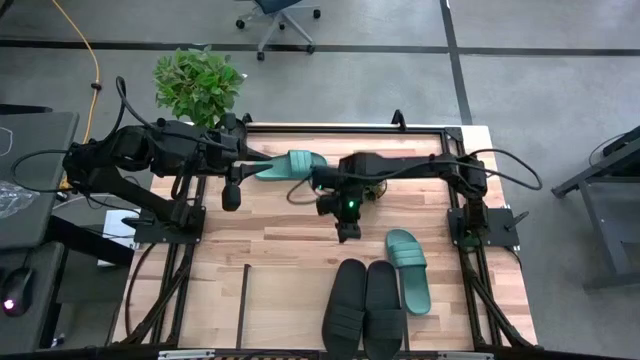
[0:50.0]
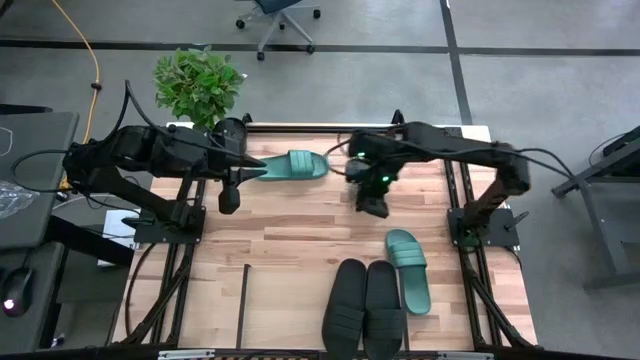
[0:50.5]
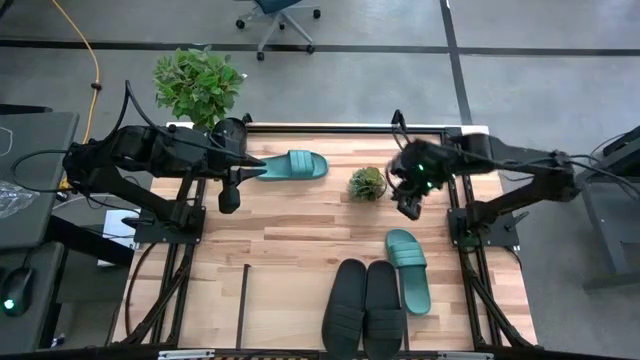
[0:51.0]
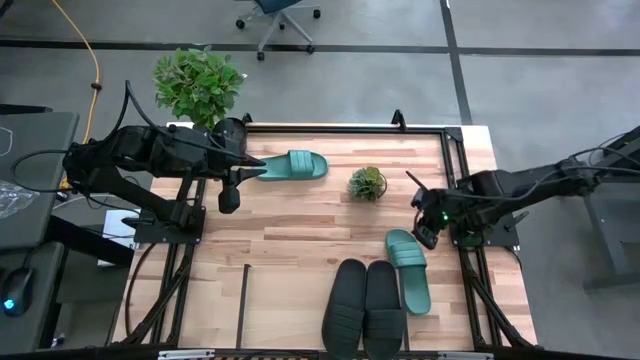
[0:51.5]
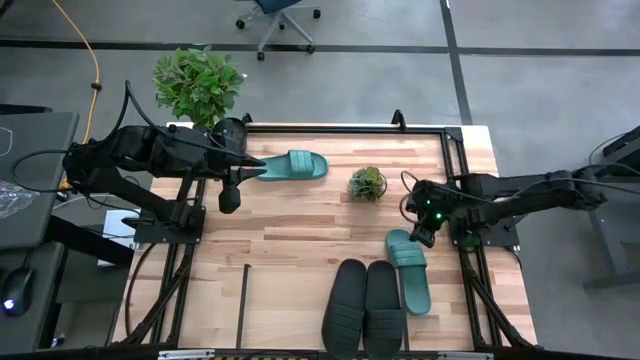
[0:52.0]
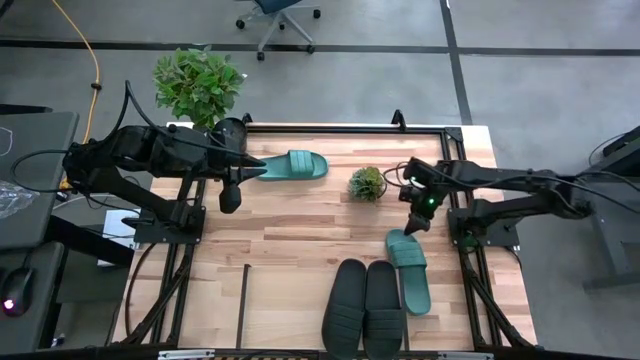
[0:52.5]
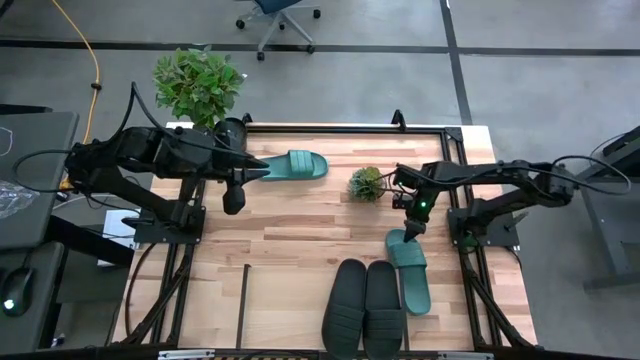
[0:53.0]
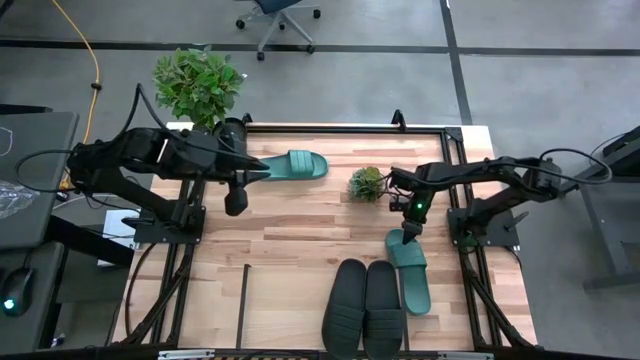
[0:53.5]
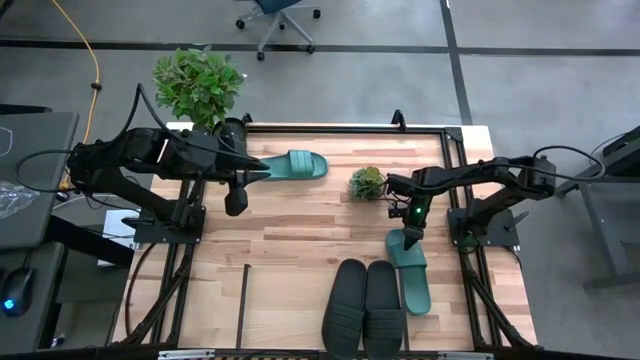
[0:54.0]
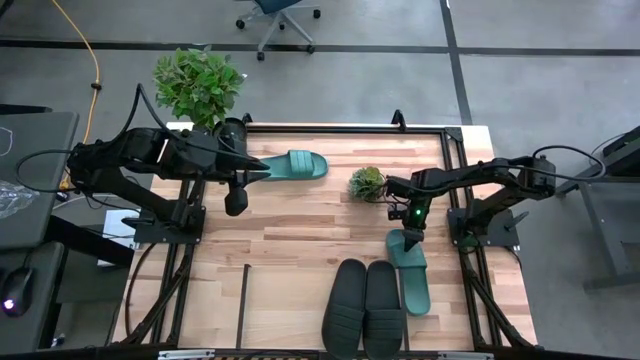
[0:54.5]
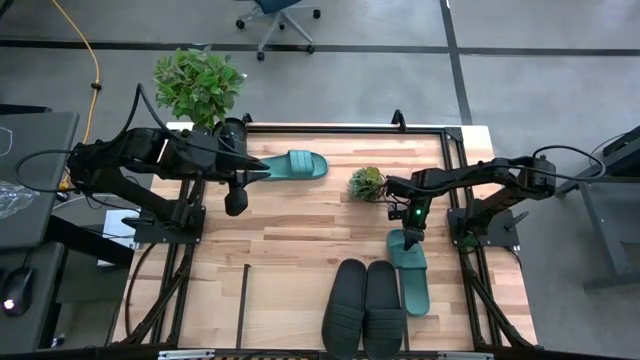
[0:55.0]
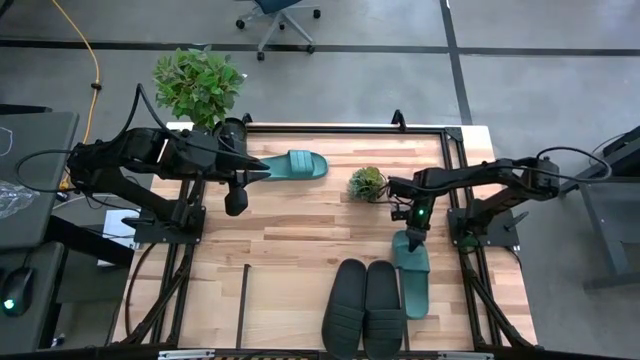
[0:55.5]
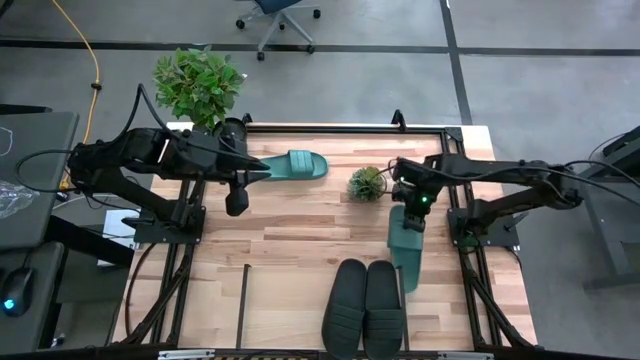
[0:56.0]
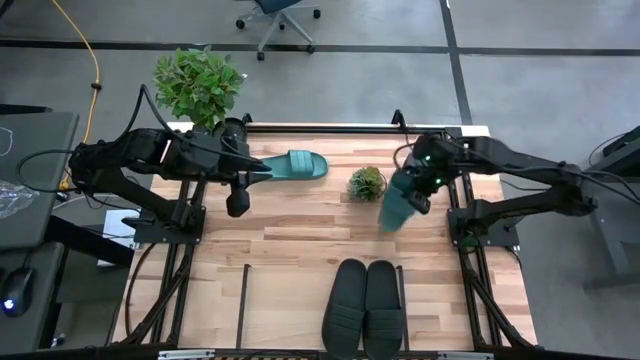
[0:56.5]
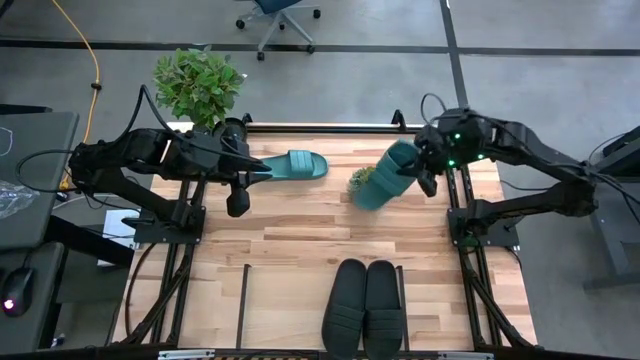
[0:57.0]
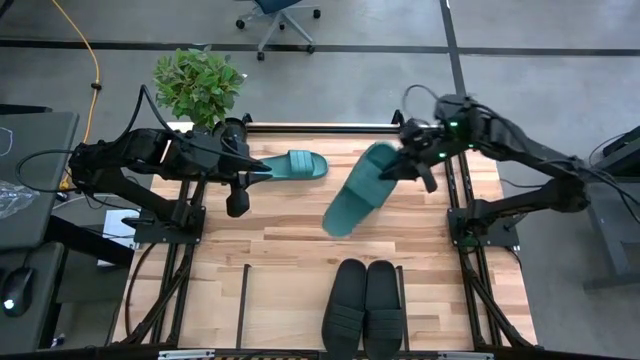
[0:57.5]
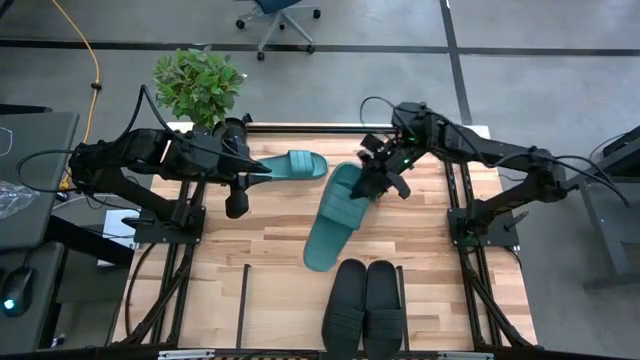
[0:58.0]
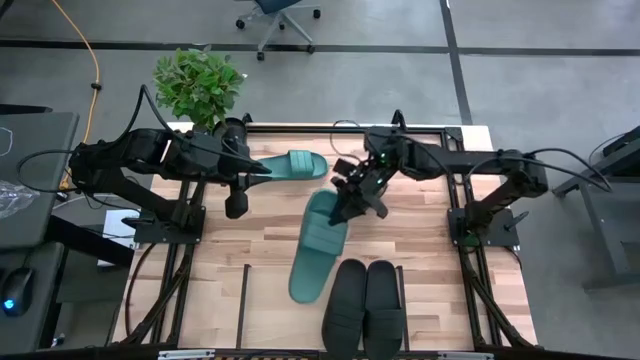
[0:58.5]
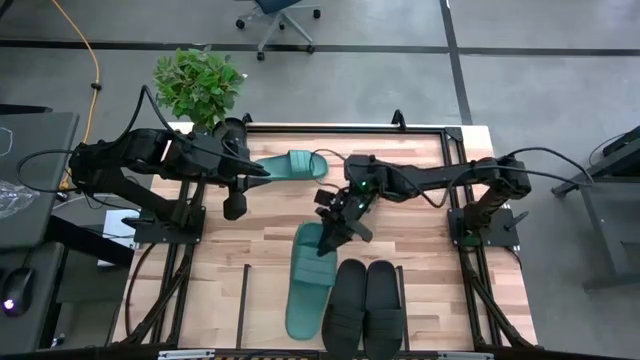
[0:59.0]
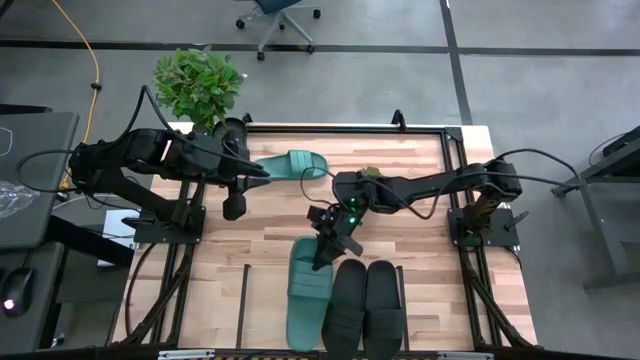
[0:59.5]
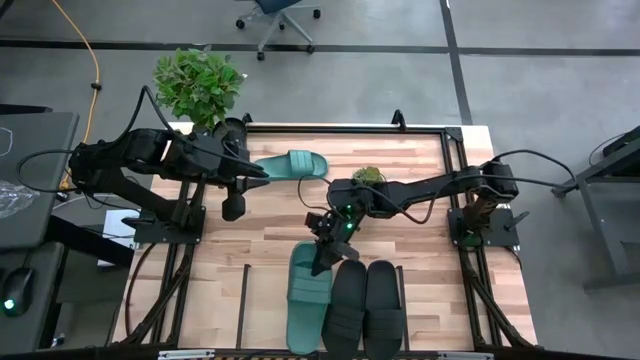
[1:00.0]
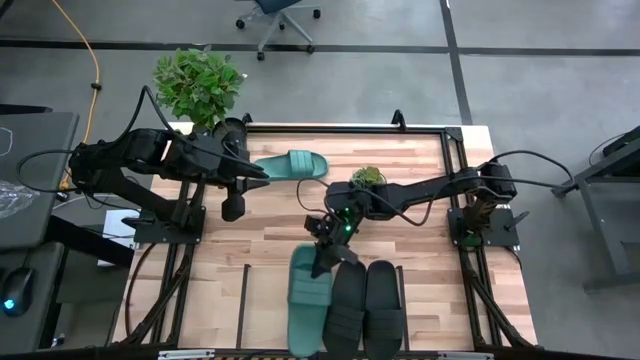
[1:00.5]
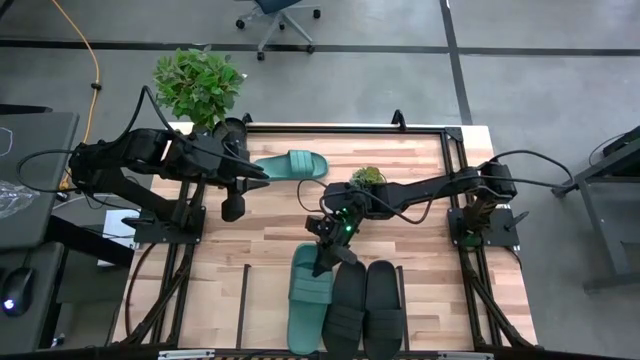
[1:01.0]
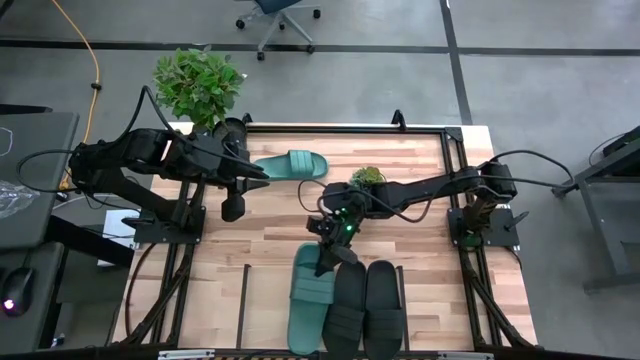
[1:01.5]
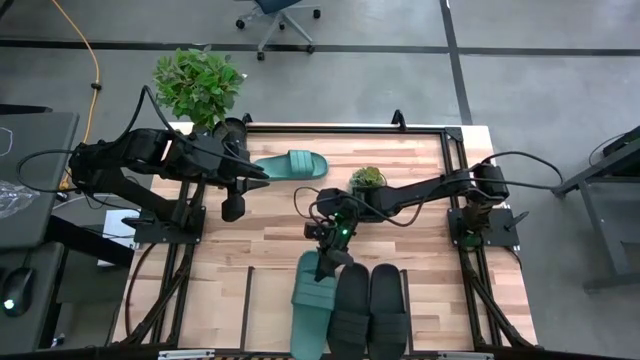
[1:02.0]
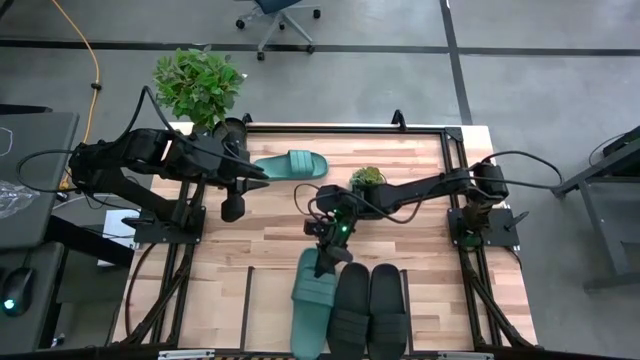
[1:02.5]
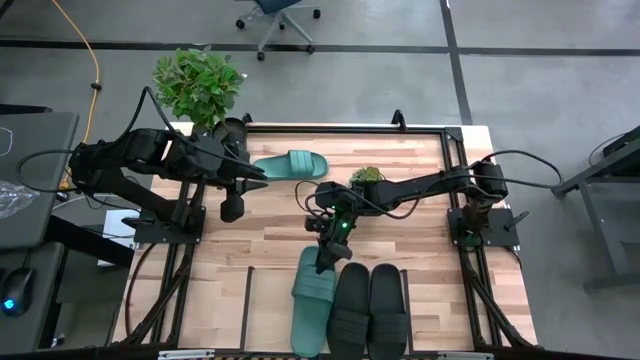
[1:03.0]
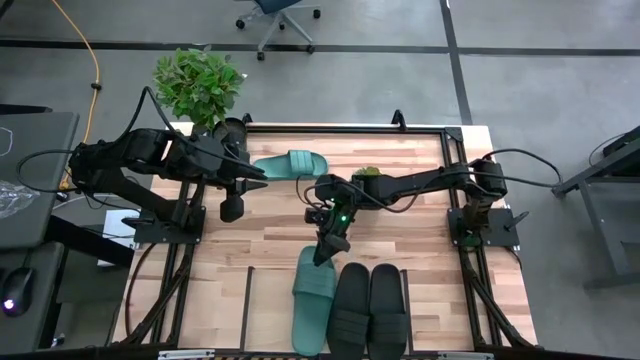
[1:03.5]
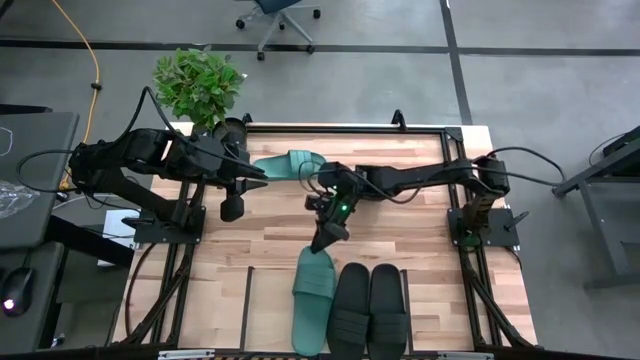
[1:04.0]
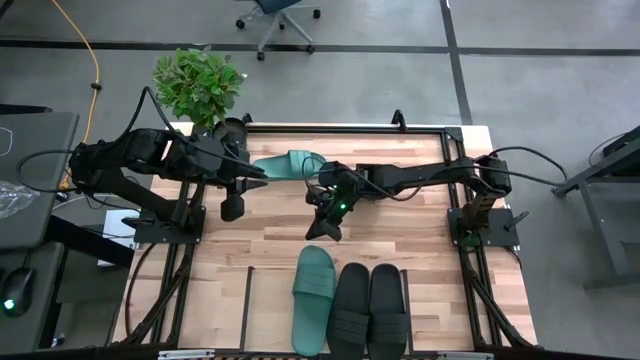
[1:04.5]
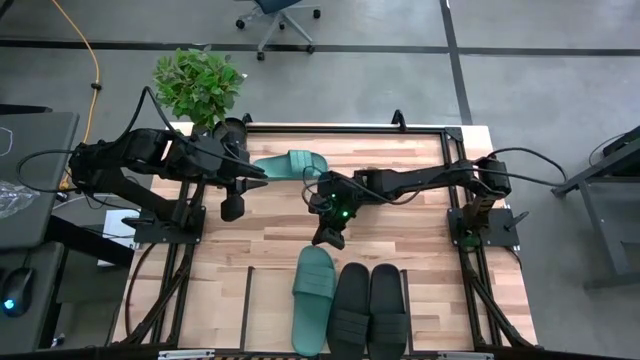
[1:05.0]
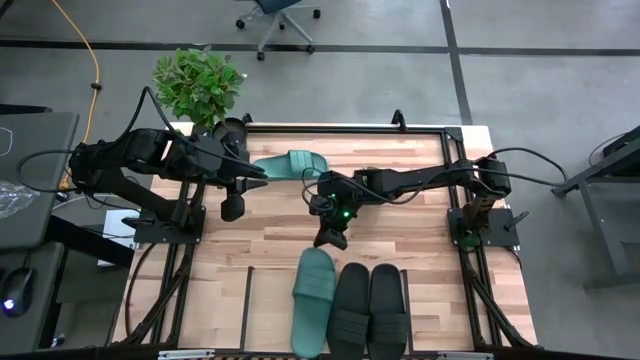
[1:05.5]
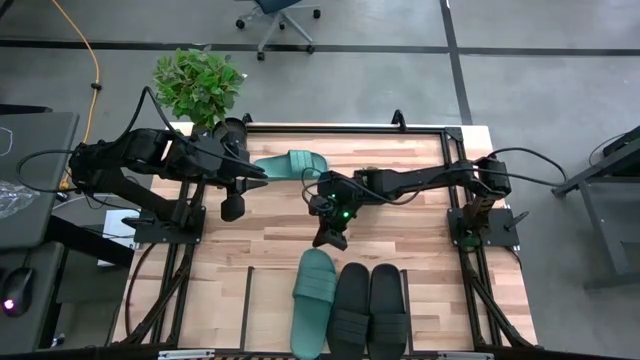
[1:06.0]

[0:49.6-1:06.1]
Task: Pick and place slides into the shelf
Put the right blue slide on the shelf
